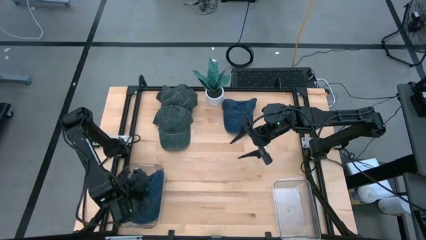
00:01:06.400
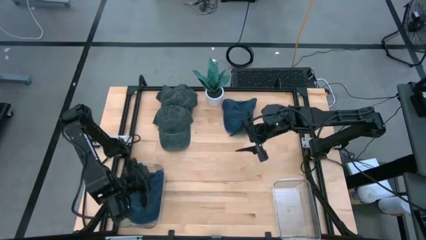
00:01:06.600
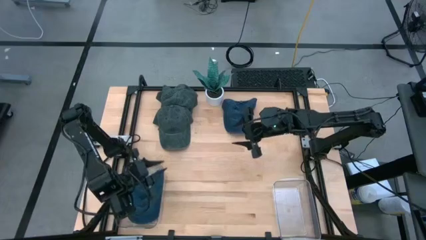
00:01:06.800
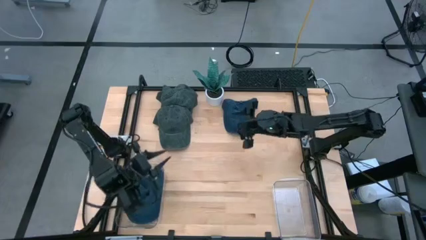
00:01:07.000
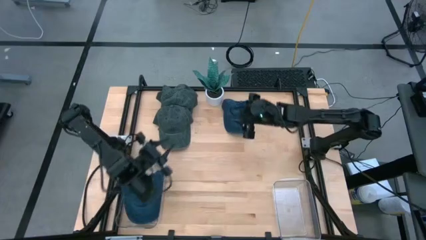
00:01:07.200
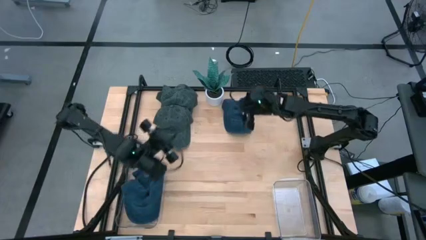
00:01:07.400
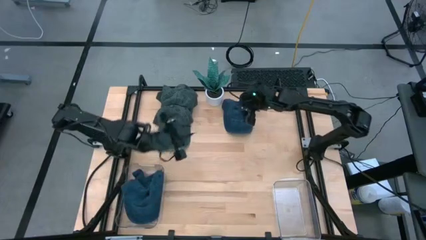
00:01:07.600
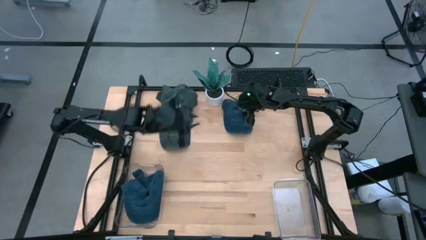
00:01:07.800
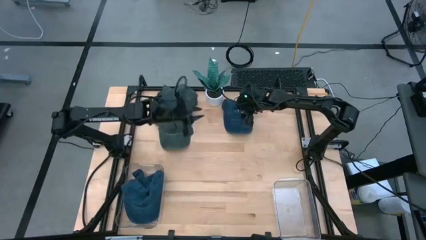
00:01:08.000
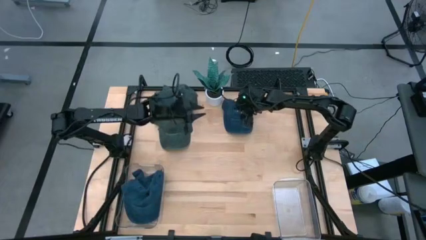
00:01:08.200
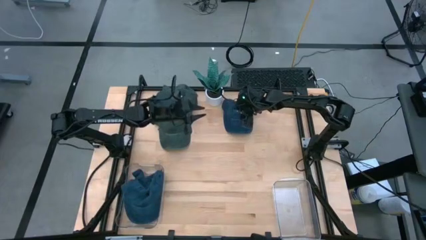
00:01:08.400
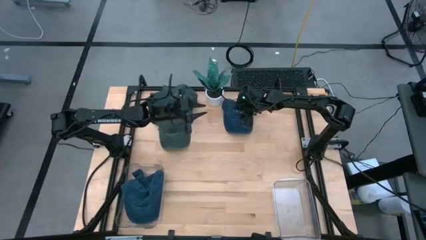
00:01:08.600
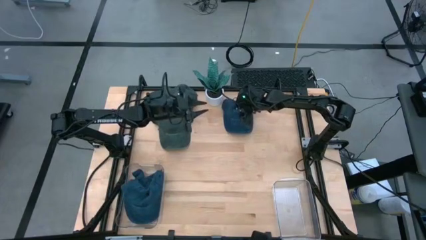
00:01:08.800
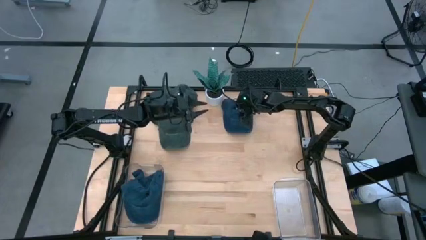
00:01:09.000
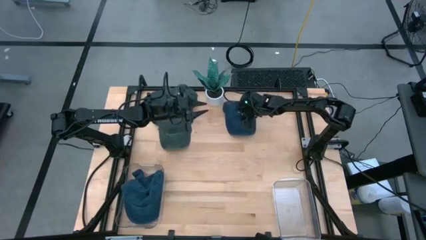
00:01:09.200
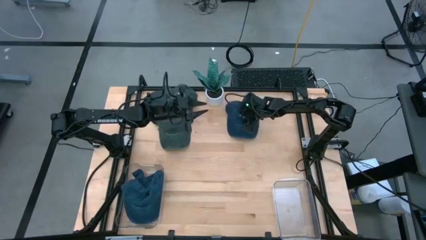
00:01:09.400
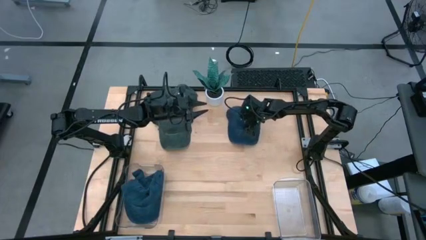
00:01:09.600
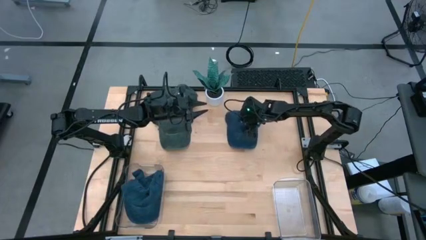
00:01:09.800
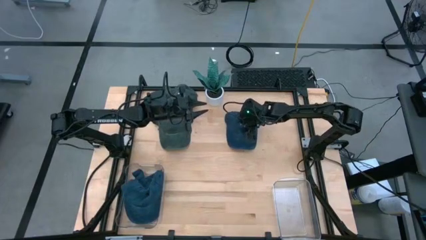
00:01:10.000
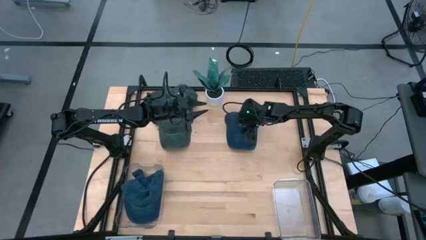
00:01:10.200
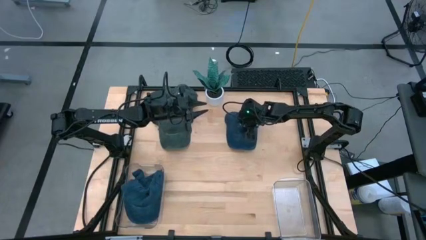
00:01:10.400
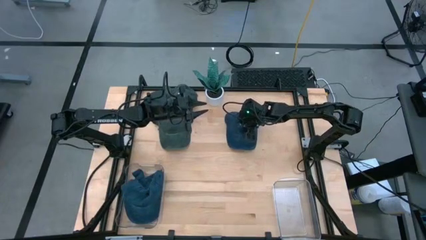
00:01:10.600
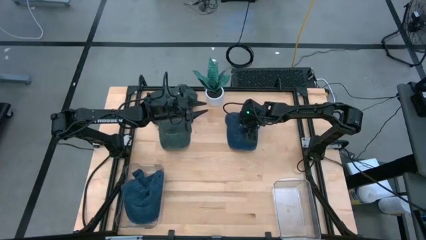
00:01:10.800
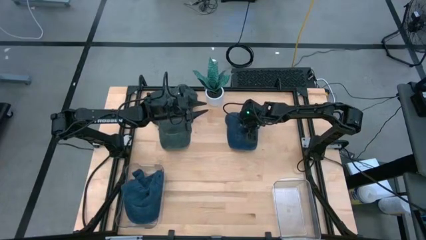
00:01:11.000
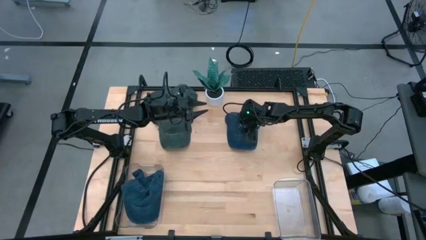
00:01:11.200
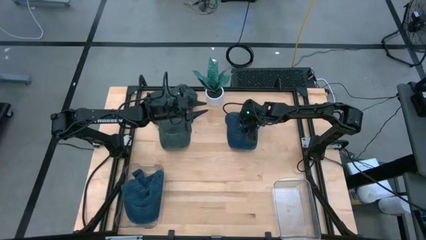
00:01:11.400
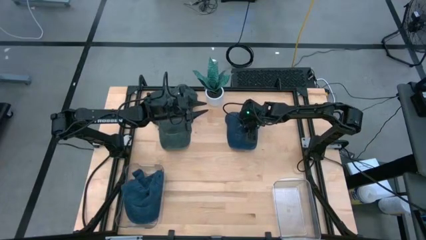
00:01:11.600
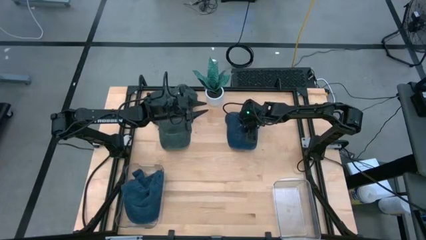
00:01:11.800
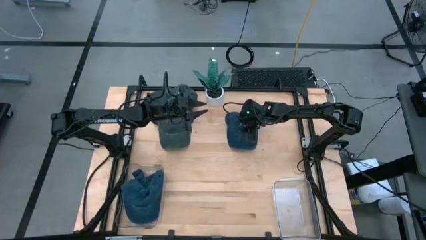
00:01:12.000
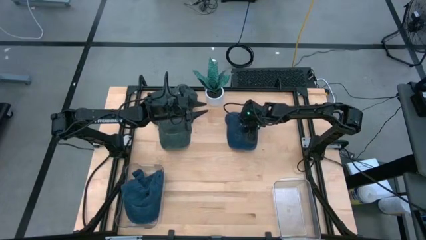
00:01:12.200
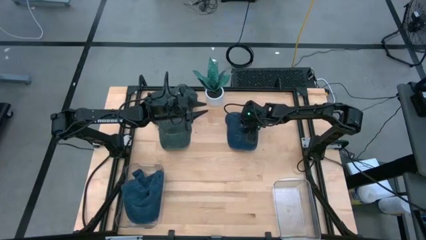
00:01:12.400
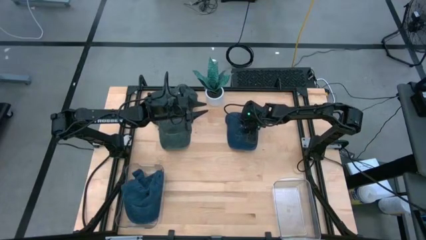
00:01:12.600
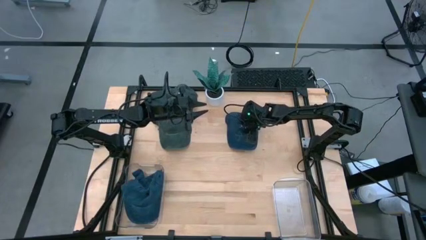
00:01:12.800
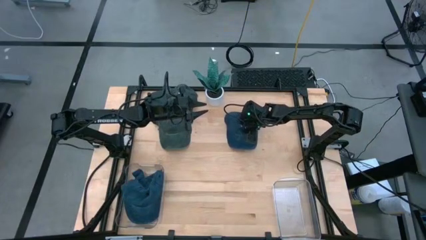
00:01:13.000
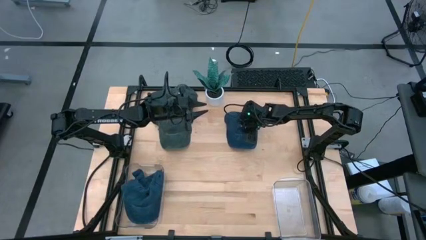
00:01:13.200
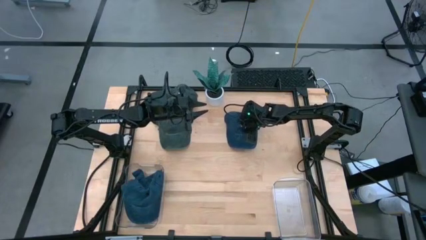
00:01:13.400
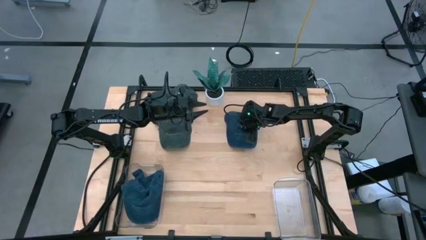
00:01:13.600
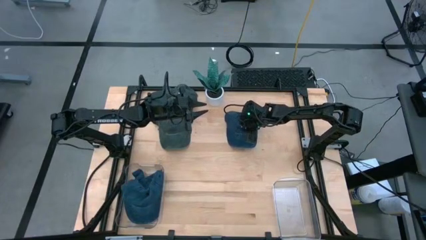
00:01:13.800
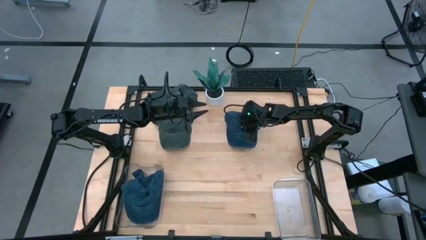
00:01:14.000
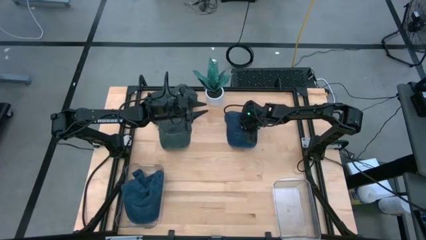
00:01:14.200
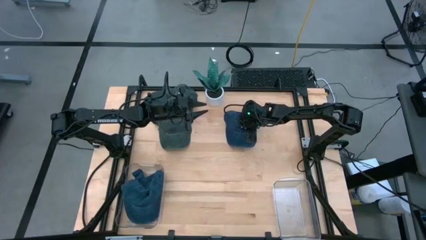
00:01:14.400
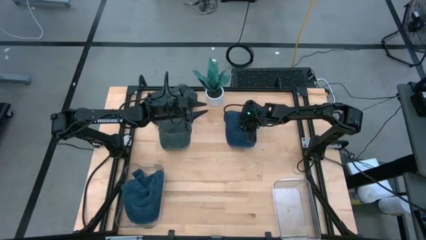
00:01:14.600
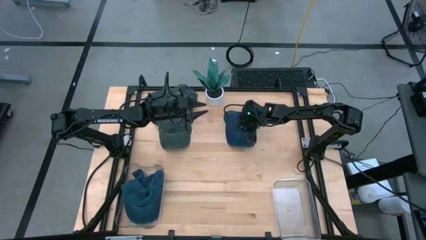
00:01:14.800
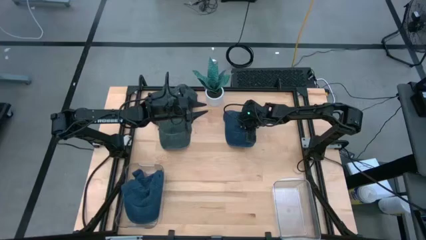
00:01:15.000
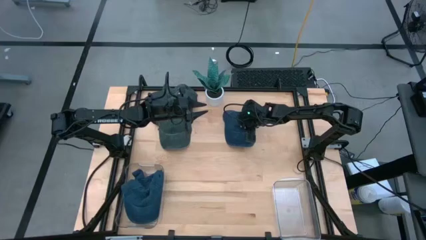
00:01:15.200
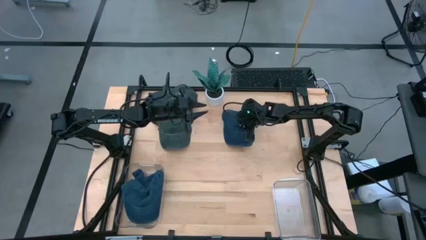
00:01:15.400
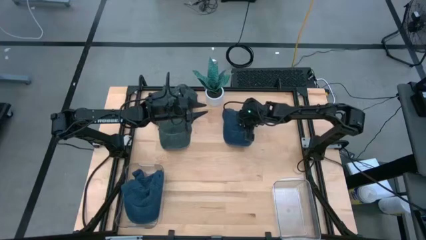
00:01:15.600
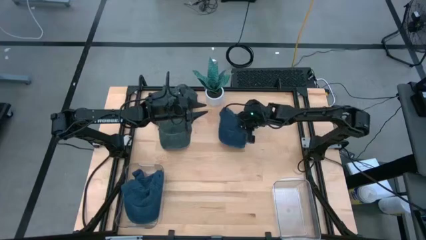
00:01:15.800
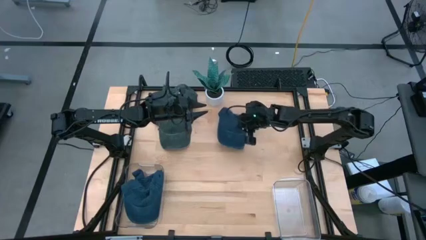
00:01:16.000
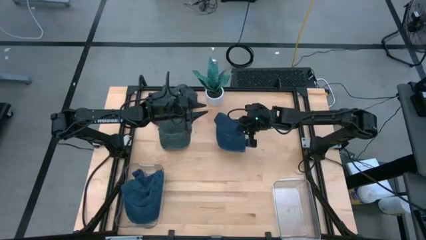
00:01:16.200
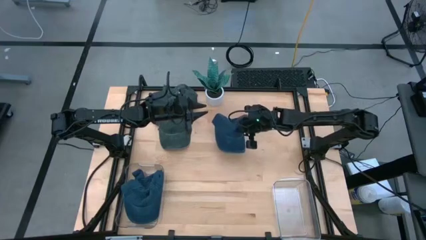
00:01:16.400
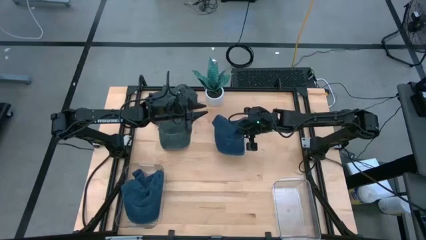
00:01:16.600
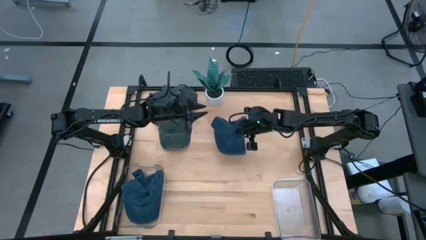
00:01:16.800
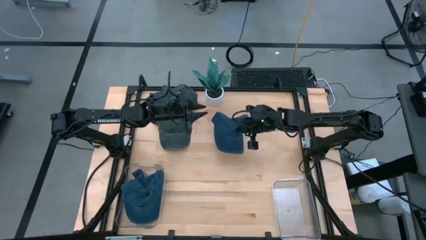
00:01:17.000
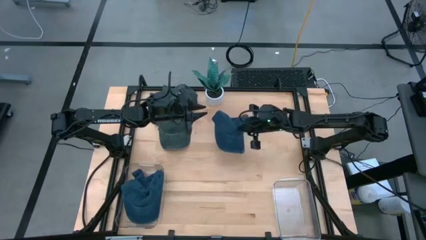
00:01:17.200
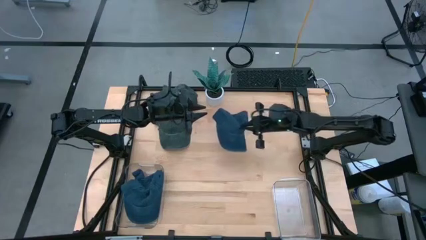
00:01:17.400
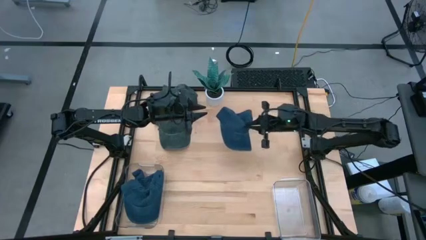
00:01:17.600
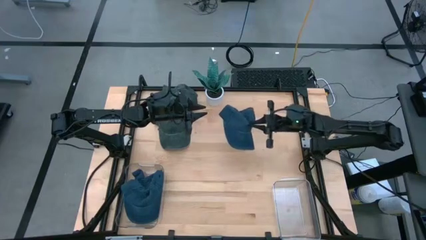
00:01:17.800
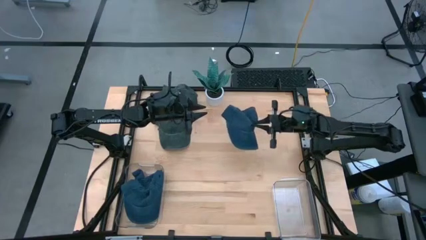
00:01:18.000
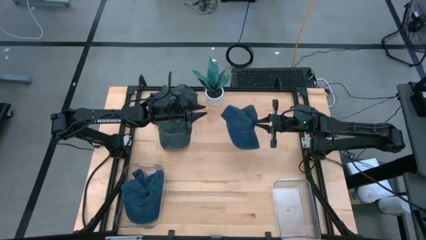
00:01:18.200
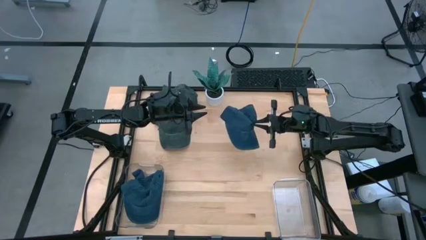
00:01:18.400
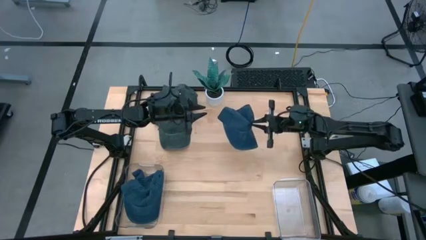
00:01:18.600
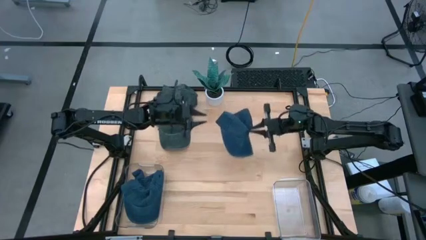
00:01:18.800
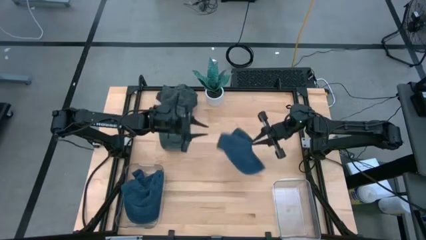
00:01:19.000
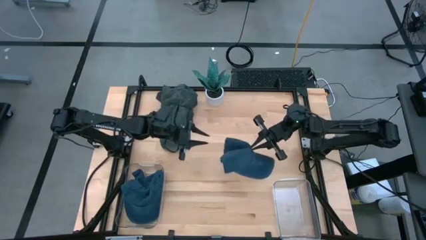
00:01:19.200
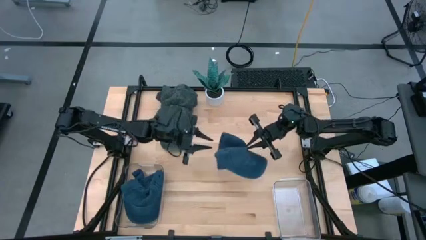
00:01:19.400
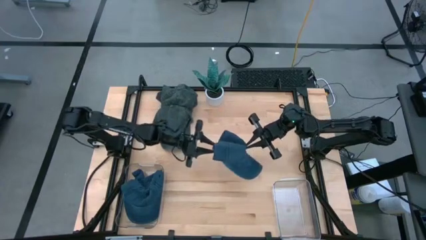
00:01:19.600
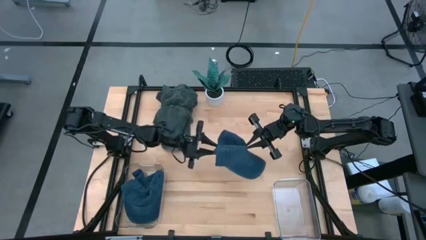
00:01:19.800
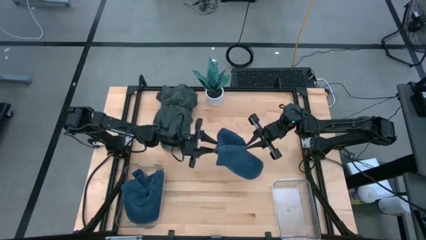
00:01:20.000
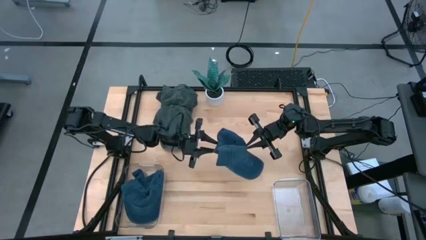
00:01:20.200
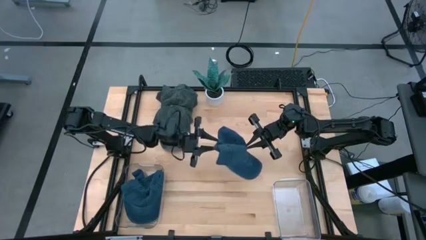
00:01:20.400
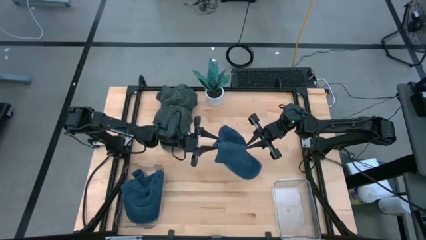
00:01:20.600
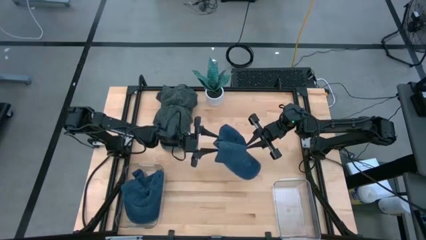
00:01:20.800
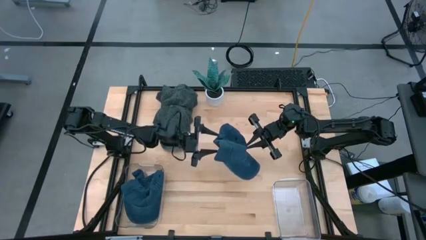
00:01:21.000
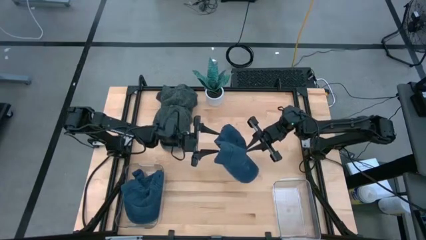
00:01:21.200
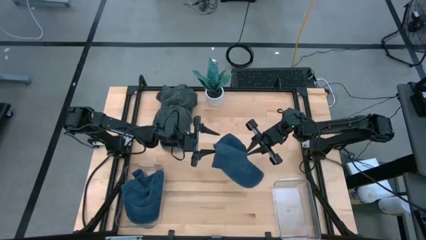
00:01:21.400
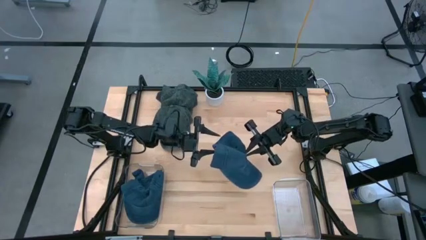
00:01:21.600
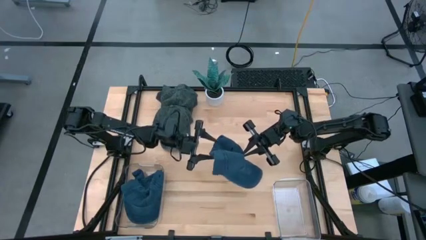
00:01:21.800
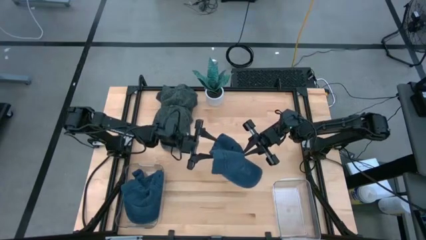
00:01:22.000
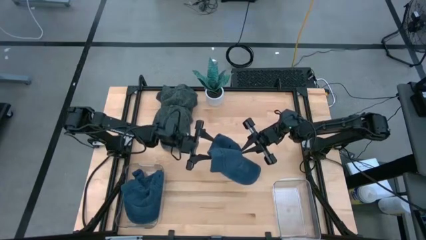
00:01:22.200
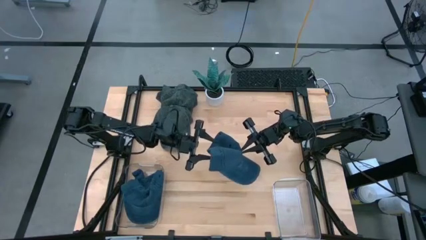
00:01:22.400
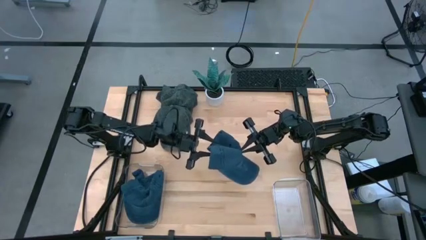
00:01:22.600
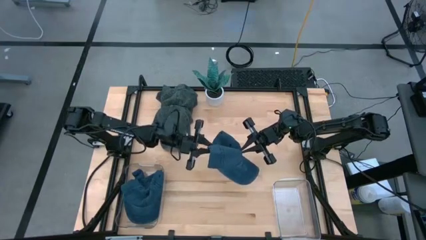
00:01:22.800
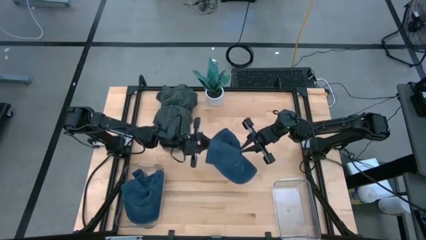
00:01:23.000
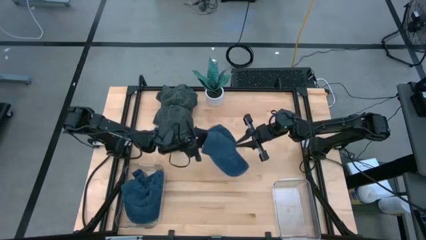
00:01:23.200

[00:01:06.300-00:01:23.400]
Task: Pick & Place hat
Put the blue cap into the left transparent bin
